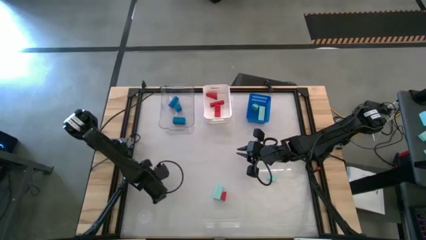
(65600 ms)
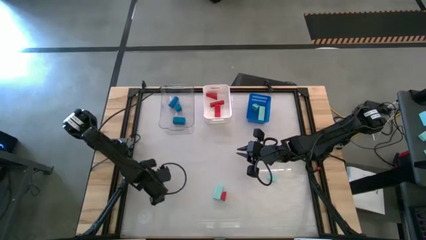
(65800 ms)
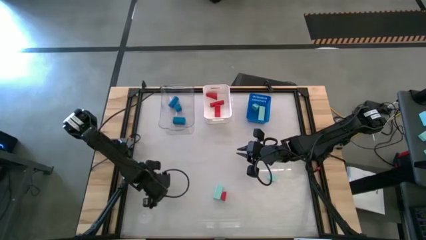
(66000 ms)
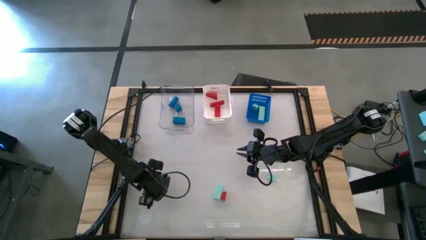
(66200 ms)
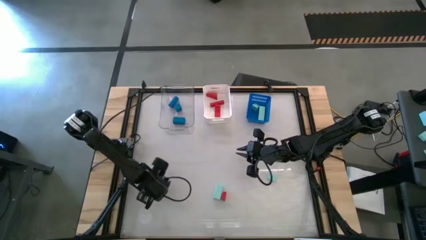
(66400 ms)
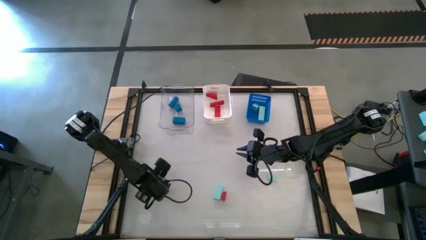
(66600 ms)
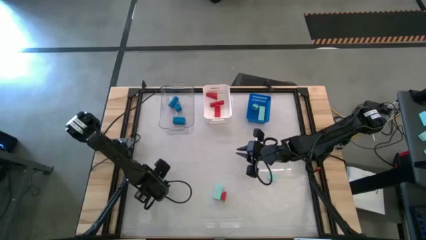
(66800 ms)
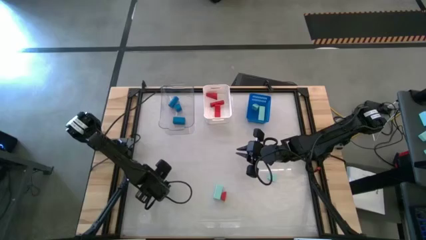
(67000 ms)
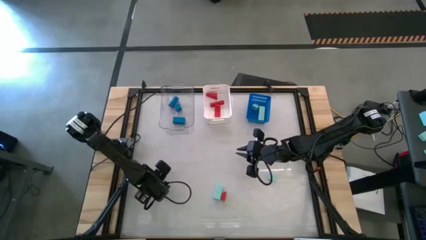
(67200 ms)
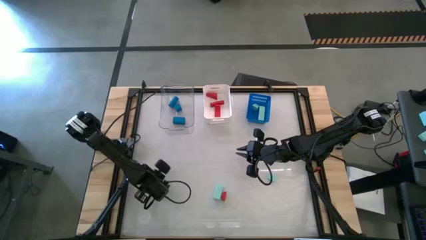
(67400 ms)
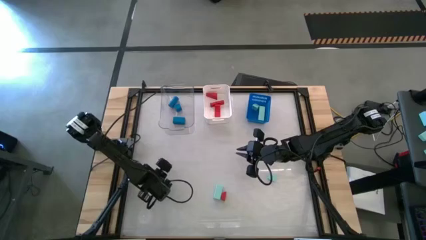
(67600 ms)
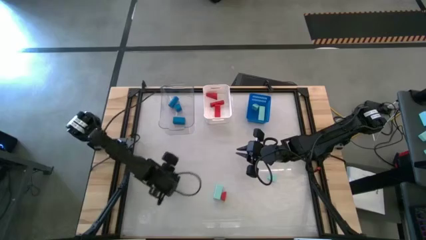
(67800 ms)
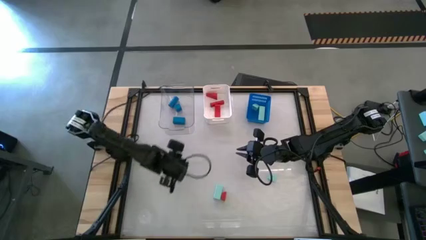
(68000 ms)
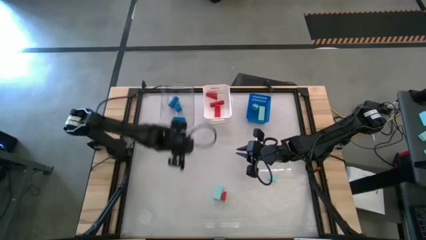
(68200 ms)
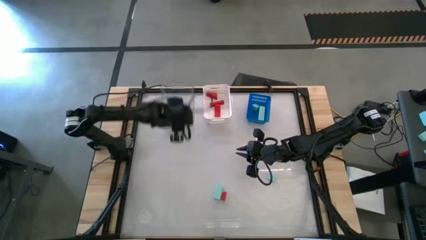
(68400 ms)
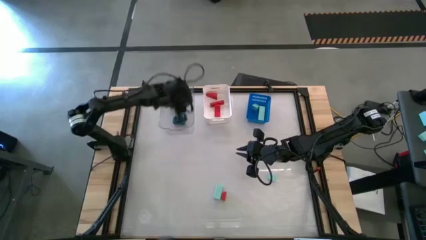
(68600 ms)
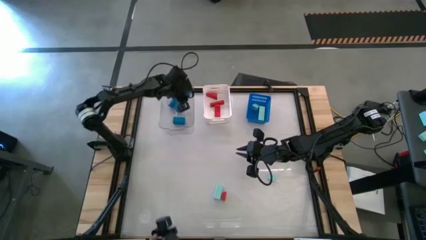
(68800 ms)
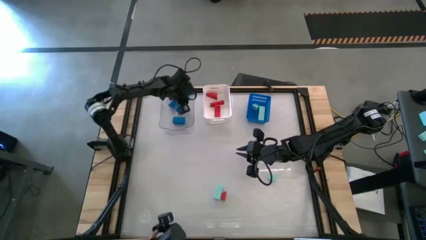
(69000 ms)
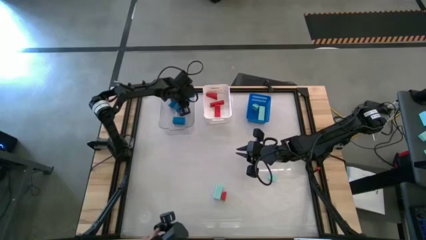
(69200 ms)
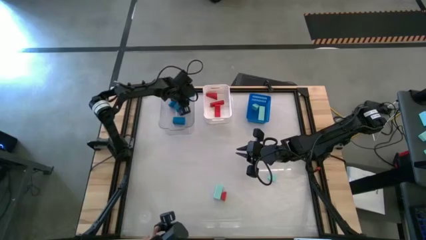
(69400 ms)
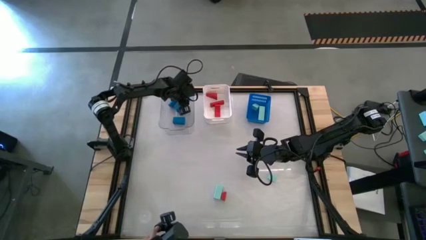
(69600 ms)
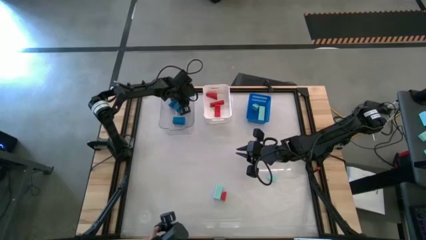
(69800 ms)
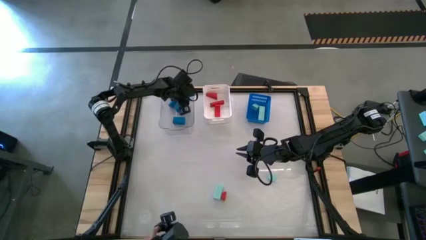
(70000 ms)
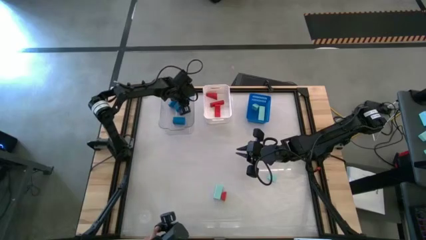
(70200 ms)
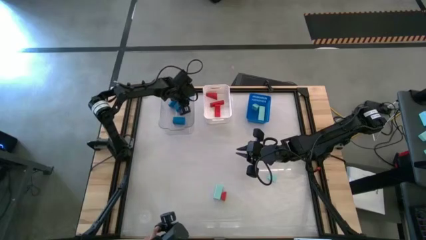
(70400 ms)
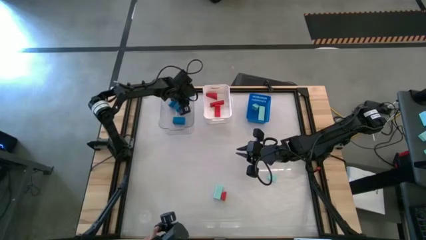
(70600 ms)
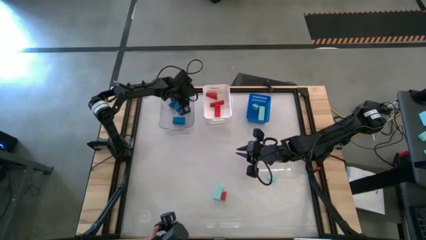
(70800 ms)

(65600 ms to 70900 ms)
Task: Sort & place blocks by color
Put the blue block into the transparent bin

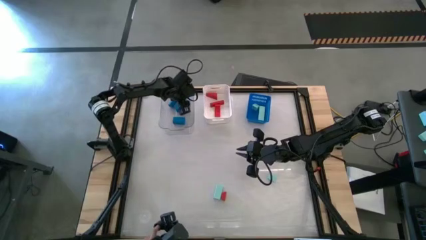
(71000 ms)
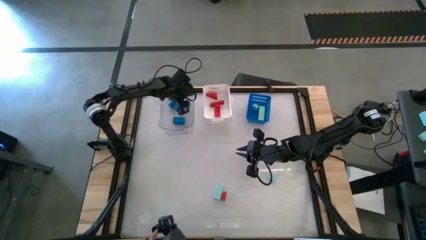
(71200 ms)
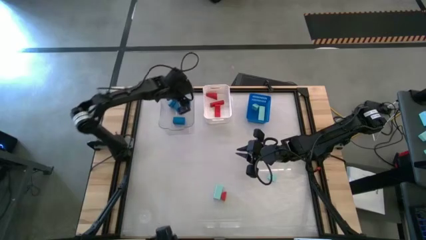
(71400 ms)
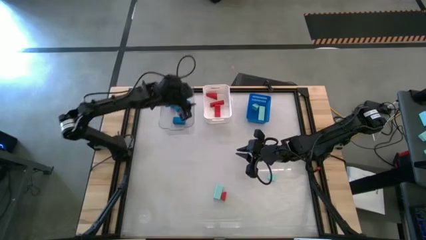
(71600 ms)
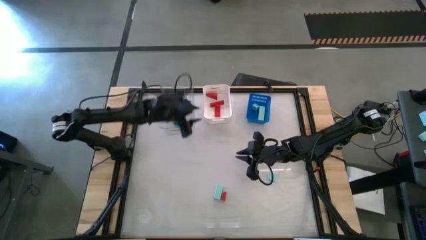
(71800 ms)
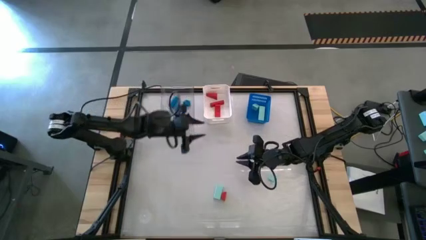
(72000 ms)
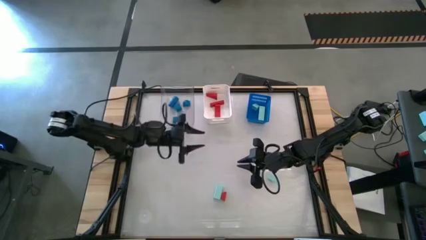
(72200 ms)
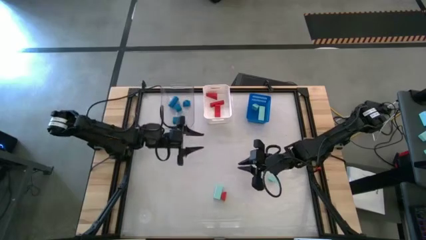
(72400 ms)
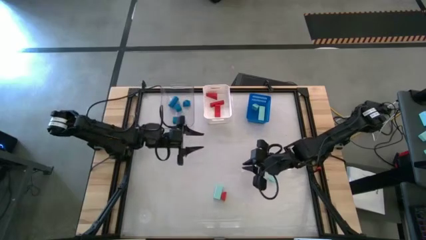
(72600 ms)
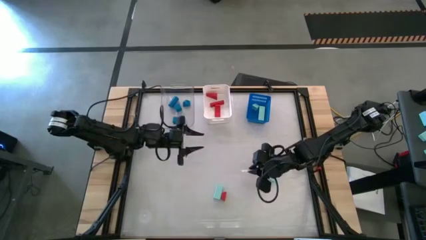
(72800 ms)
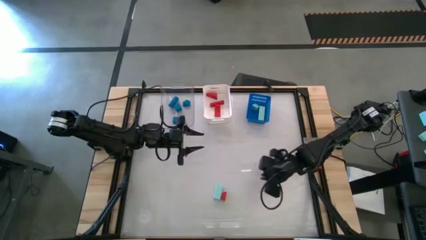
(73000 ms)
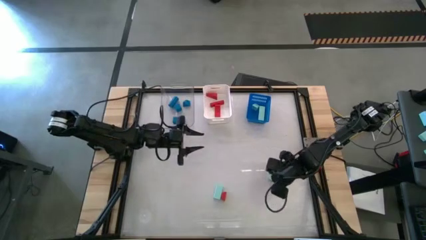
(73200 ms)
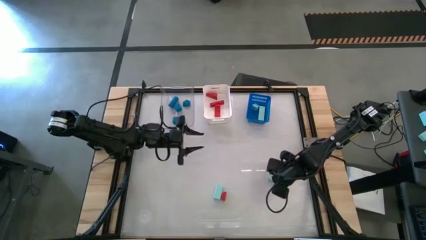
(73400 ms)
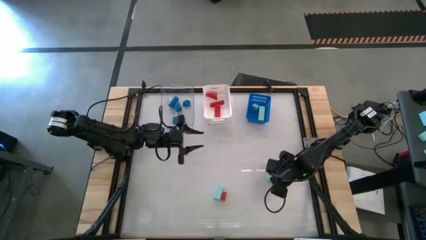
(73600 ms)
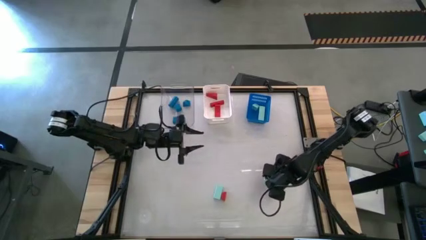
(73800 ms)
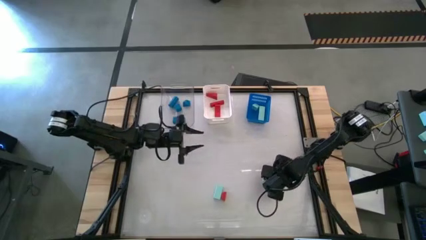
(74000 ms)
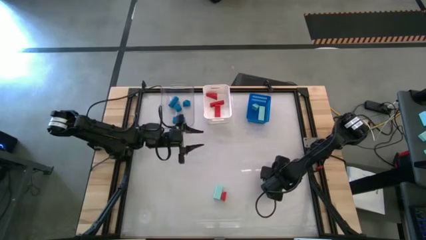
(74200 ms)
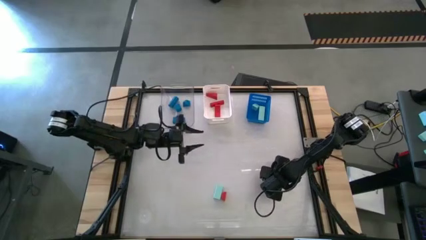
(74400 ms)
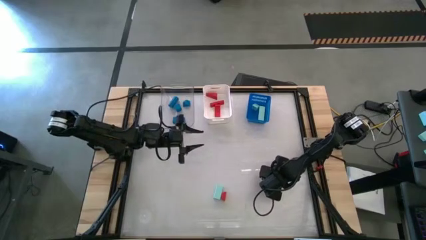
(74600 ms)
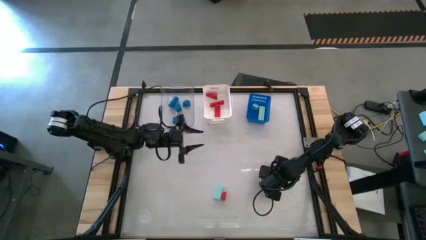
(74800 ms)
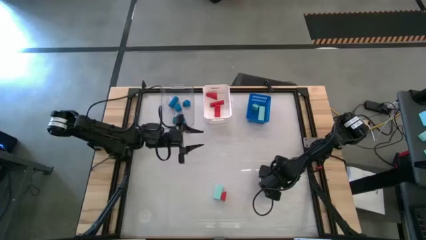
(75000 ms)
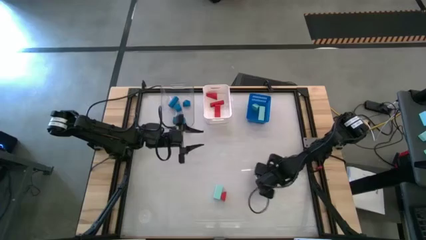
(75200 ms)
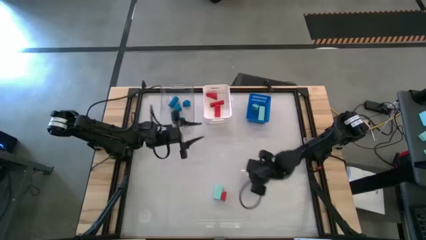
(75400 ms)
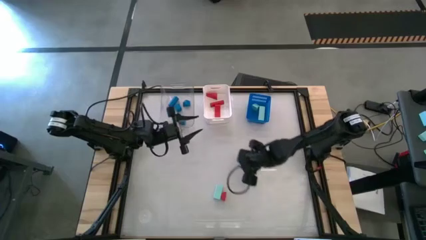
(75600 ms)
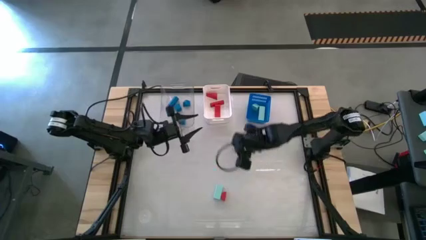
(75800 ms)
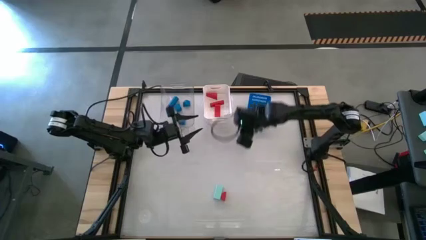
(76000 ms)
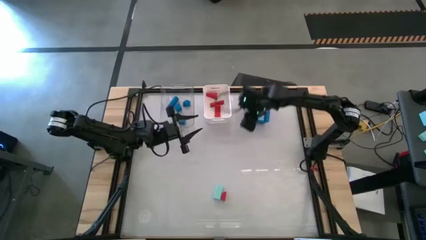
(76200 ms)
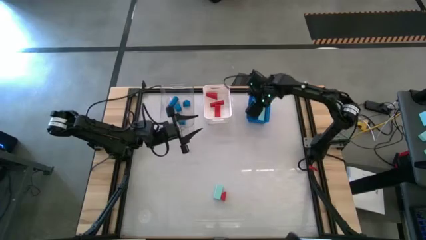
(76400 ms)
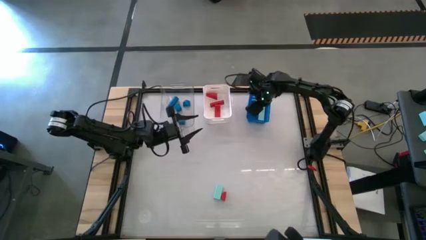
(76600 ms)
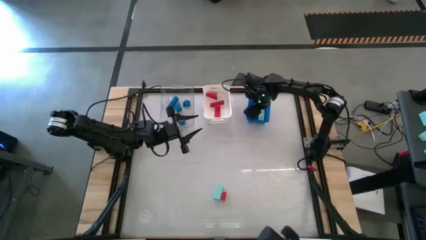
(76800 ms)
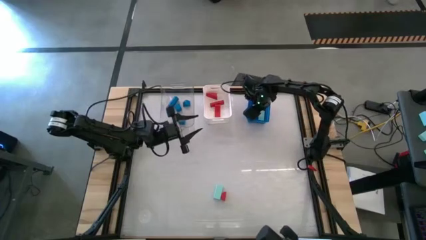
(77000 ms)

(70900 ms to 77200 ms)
Put the light blue block into the blue bin

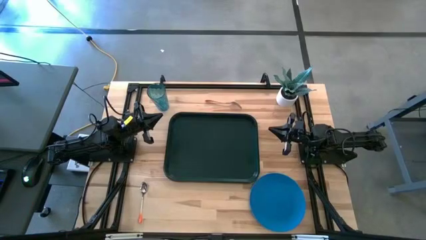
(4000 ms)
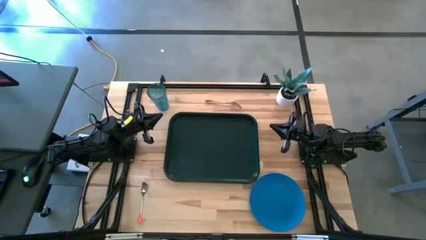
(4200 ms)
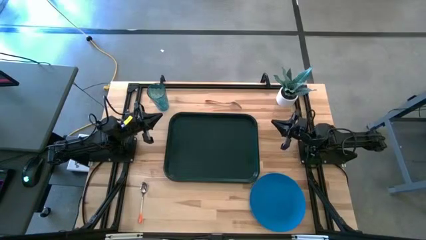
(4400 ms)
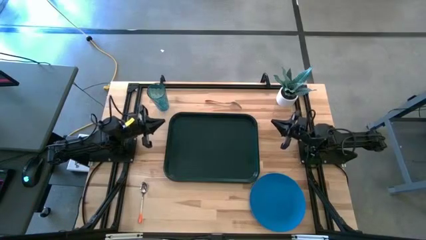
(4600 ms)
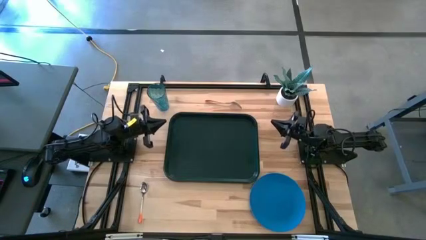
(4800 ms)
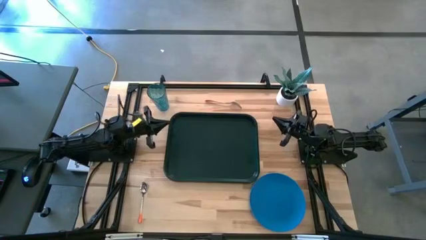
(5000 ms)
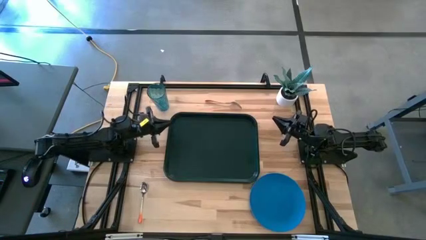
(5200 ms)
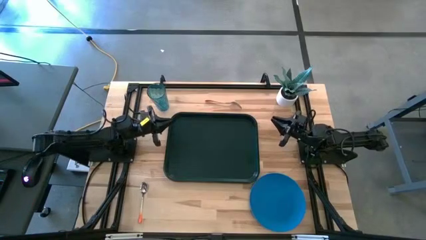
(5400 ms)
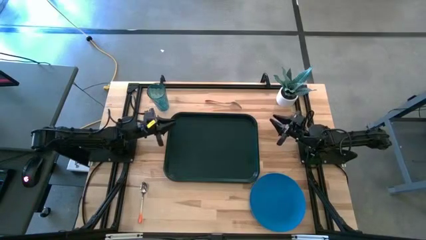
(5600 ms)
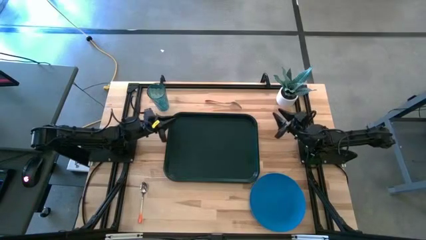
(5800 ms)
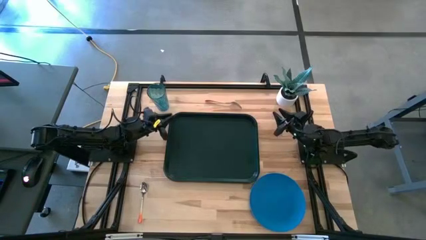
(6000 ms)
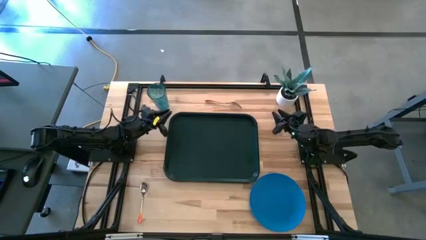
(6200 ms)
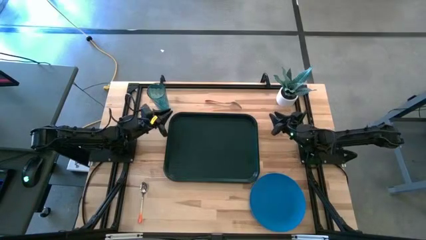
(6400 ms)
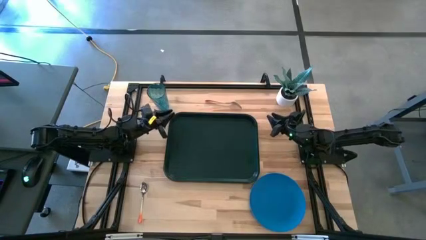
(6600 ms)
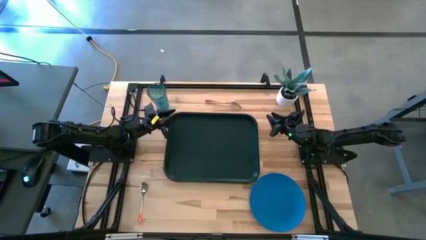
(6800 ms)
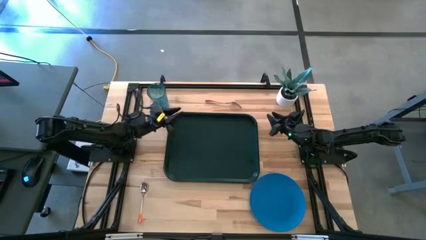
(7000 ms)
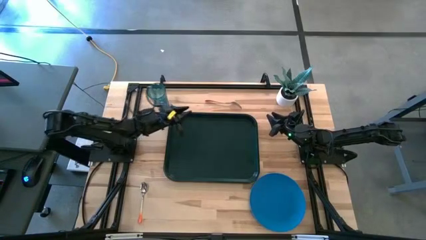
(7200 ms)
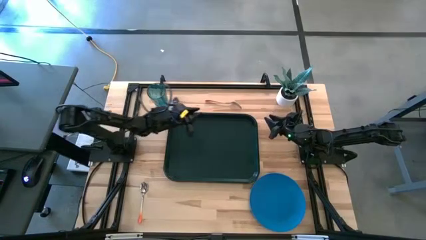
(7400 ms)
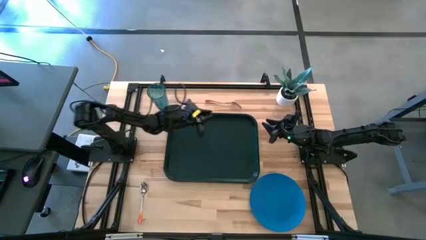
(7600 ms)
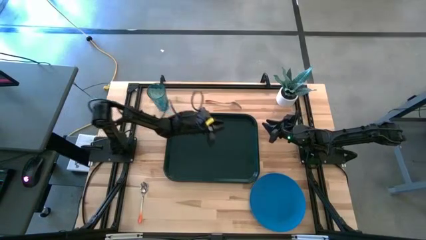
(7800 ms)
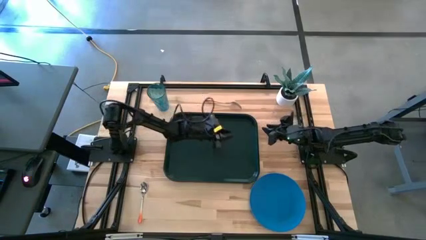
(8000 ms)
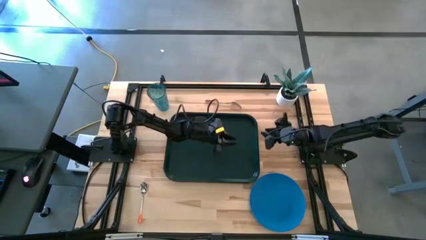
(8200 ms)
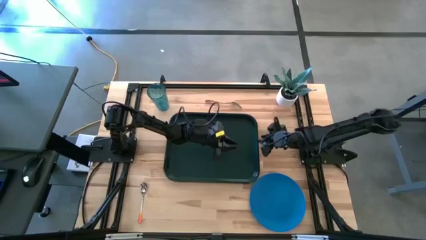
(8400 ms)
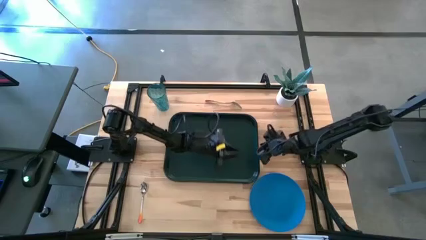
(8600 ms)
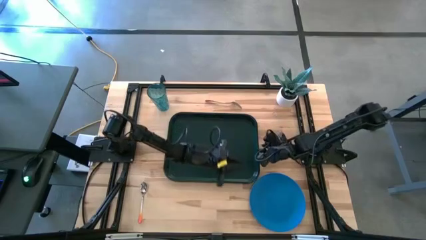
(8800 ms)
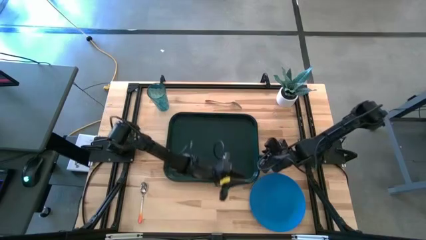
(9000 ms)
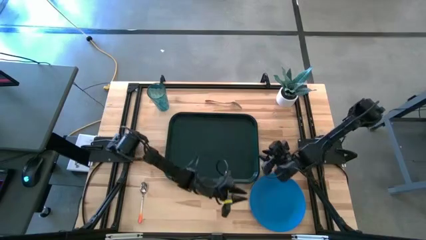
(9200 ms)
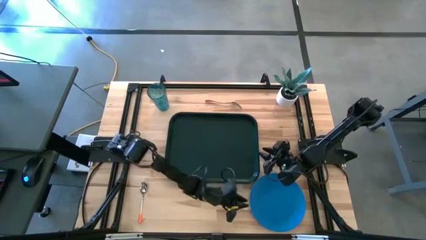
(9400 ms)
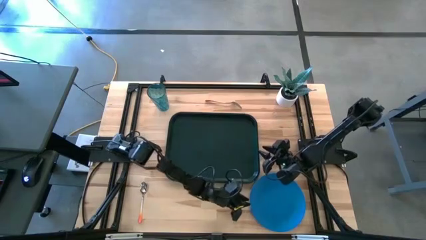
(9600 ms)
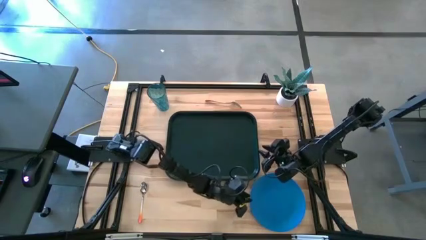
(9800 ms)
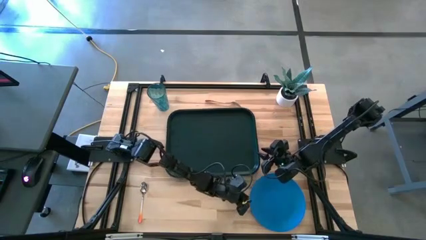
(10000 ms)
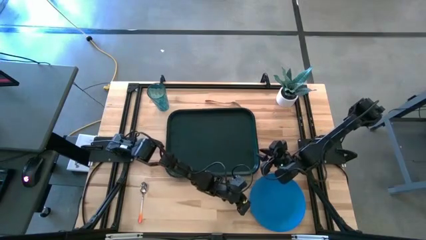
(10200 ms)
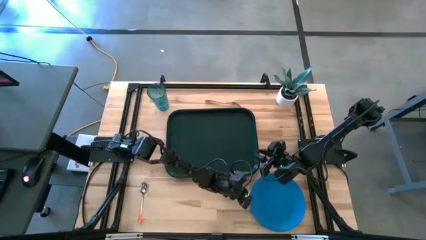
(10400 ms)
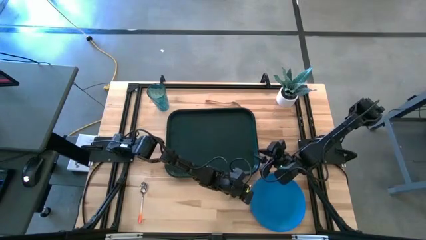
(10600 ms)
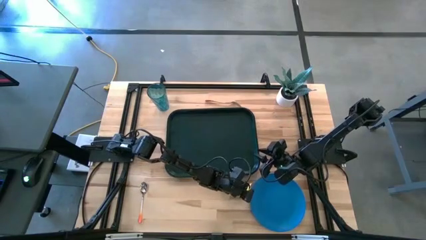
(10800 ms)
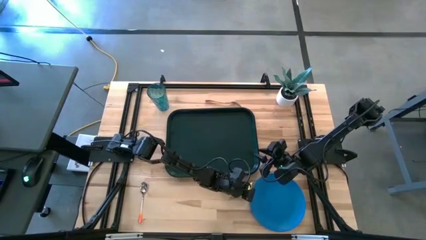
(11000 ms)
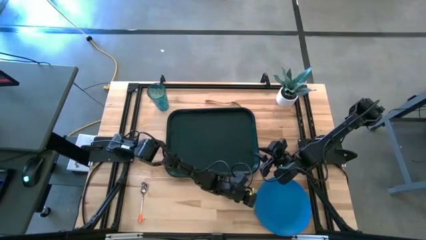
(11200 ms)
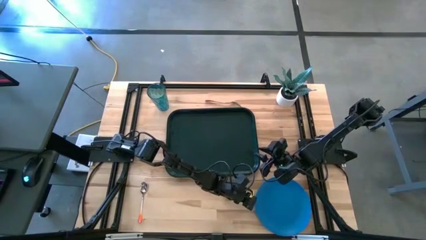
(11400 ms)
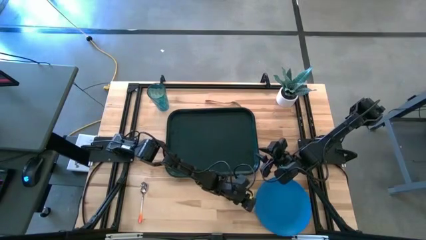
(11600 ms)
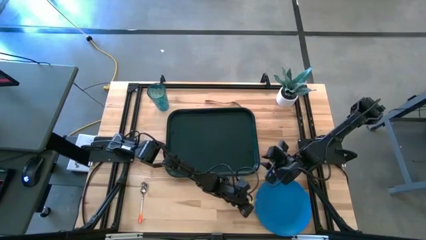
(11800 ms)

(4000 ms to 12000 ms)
Task: Pick and place plate/cup/fork/spoon on tray
Put the blue plate on the serving tray
